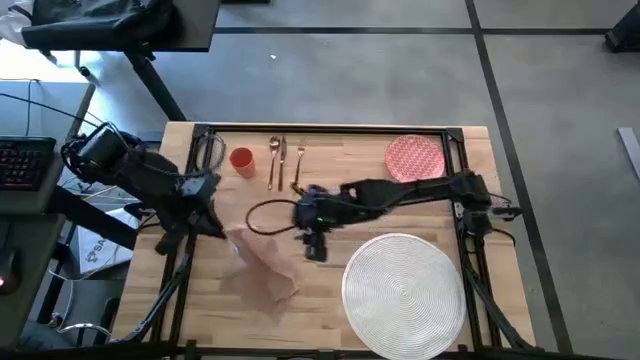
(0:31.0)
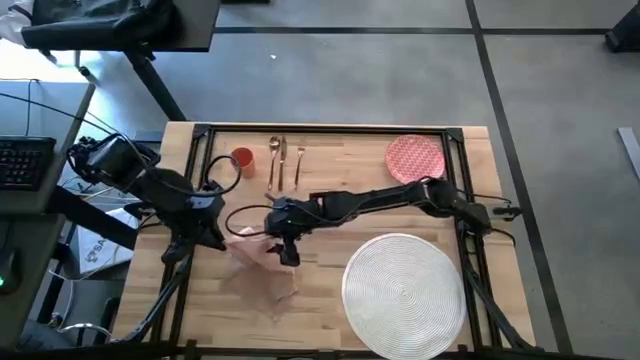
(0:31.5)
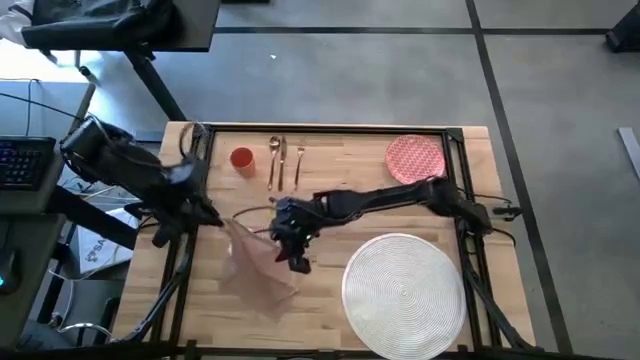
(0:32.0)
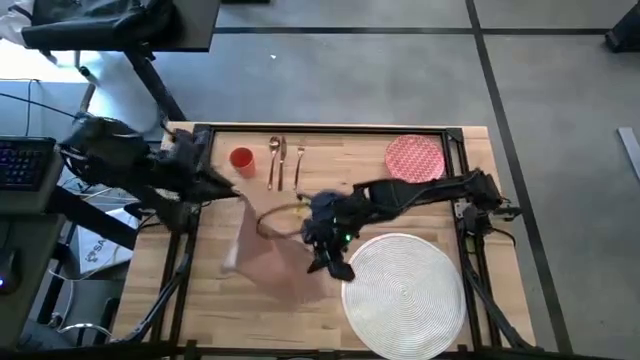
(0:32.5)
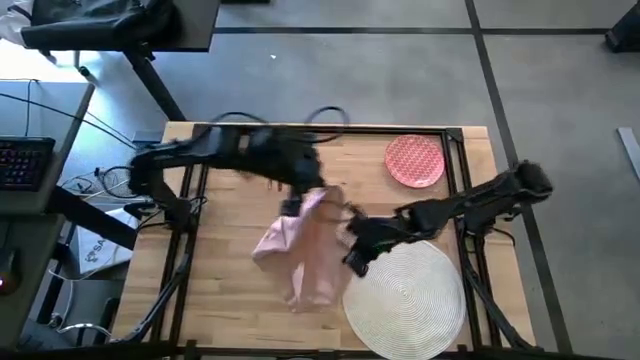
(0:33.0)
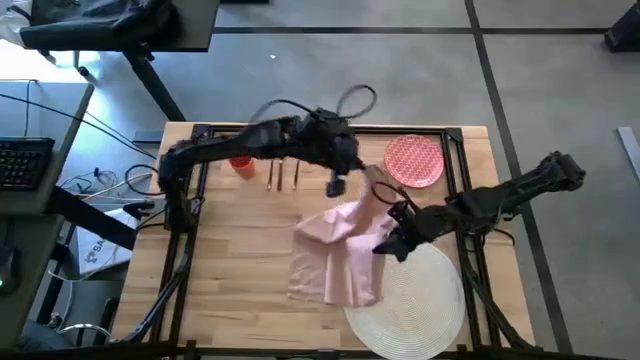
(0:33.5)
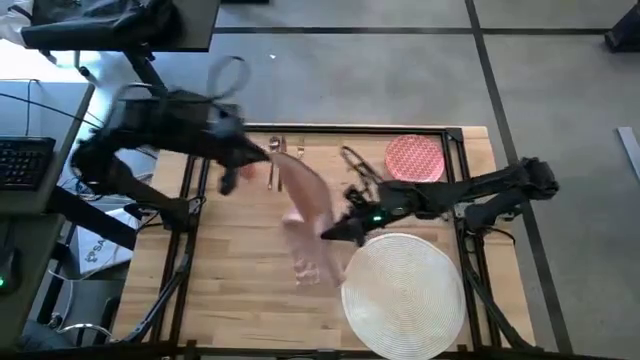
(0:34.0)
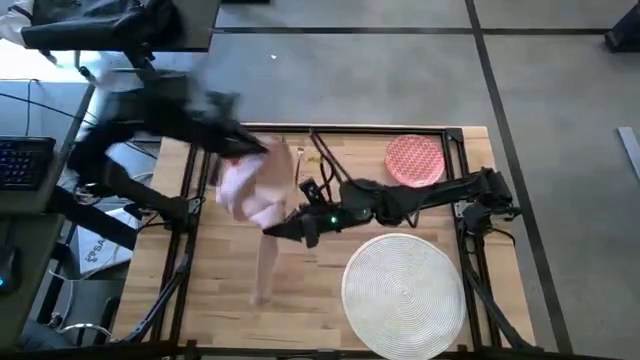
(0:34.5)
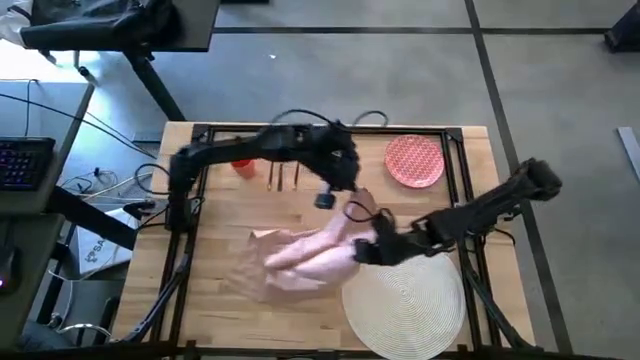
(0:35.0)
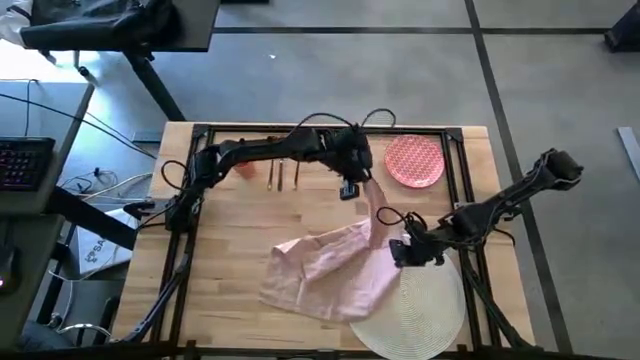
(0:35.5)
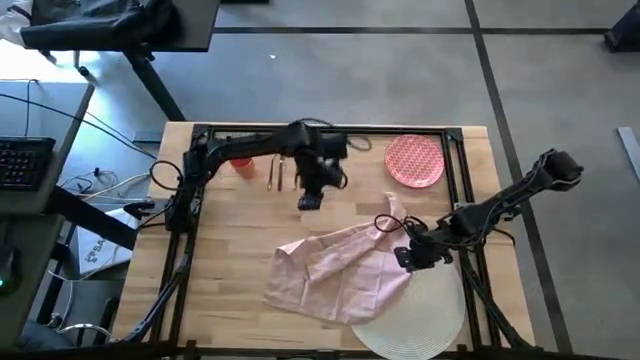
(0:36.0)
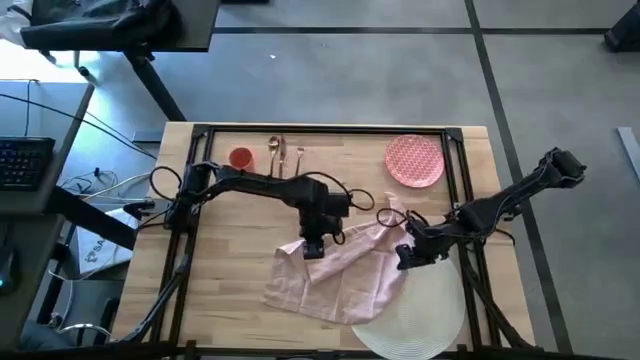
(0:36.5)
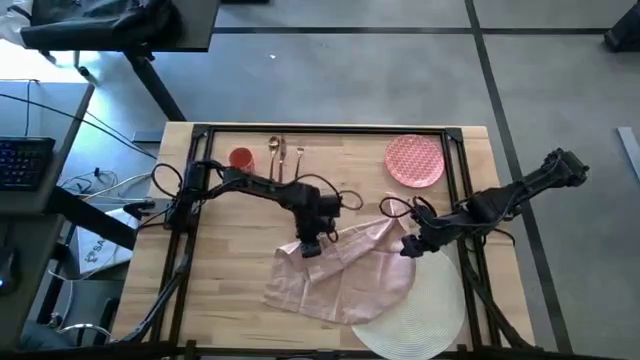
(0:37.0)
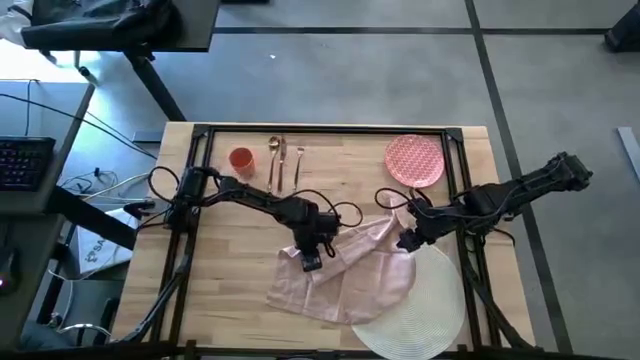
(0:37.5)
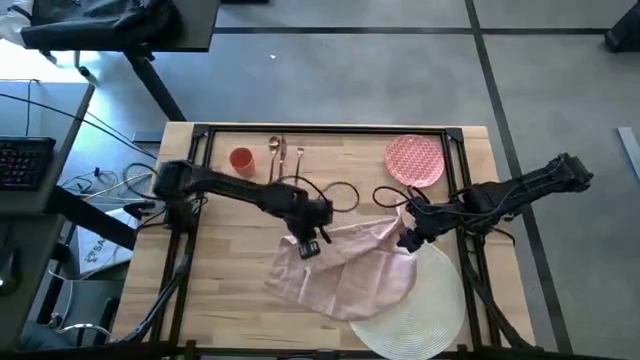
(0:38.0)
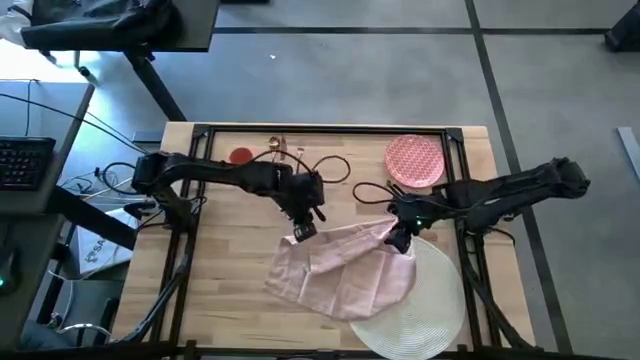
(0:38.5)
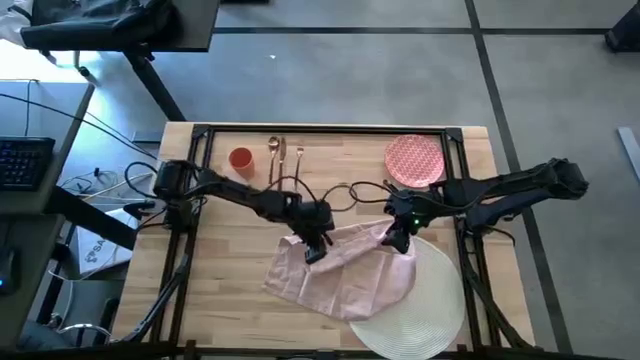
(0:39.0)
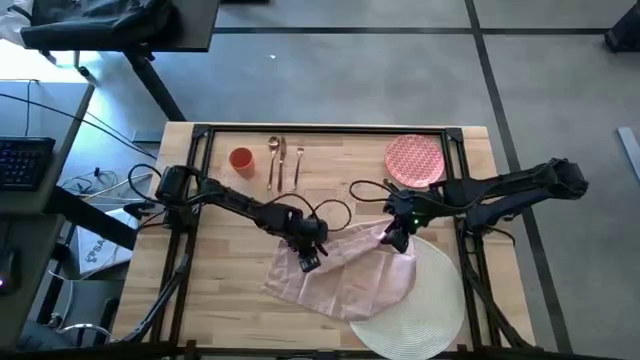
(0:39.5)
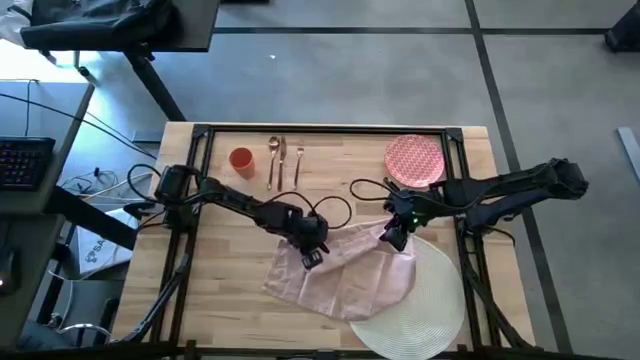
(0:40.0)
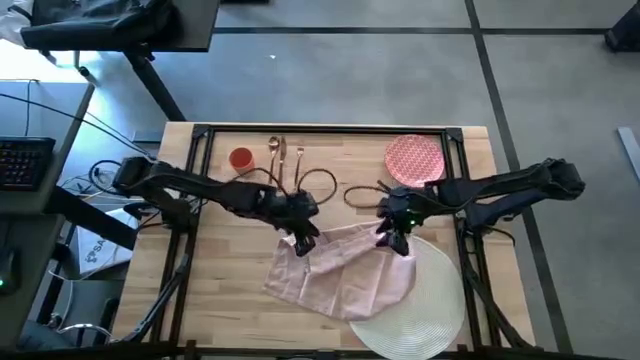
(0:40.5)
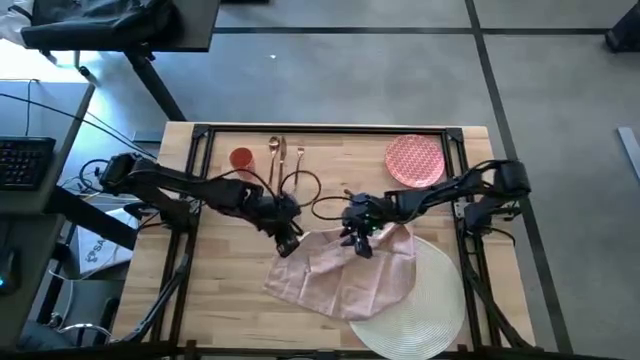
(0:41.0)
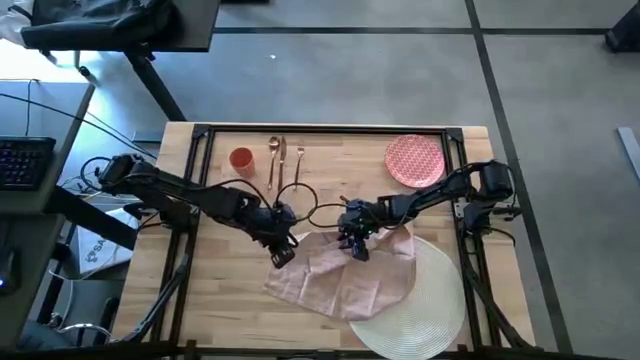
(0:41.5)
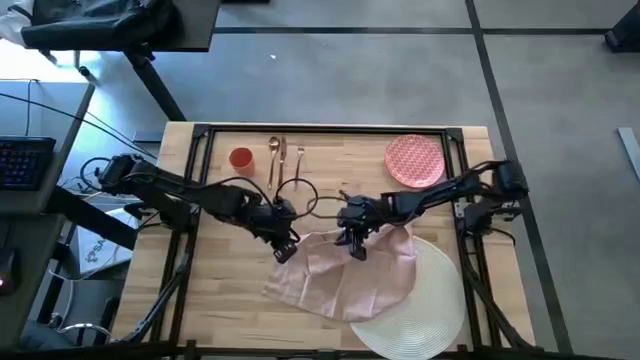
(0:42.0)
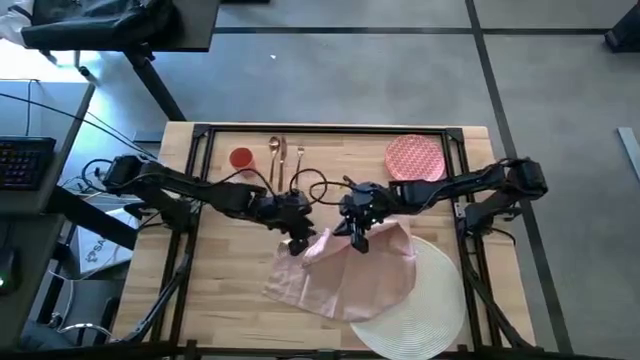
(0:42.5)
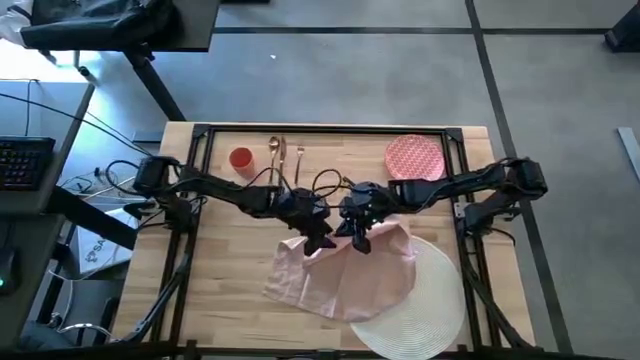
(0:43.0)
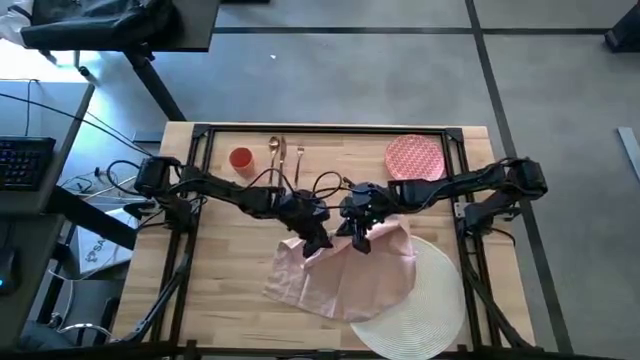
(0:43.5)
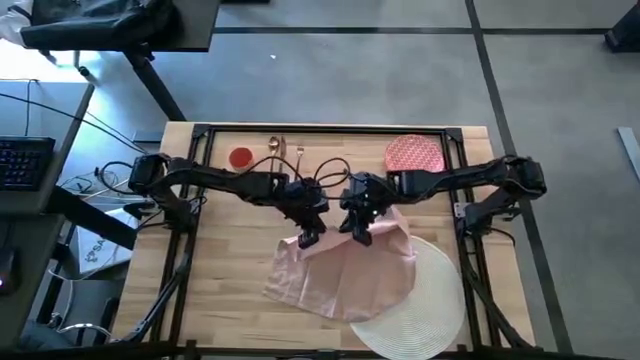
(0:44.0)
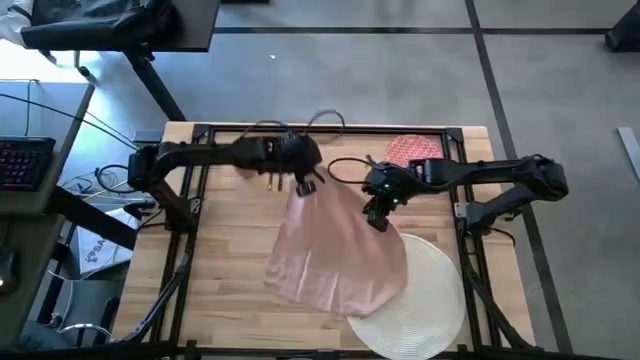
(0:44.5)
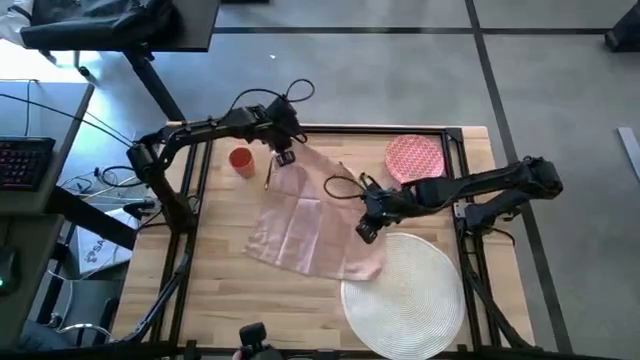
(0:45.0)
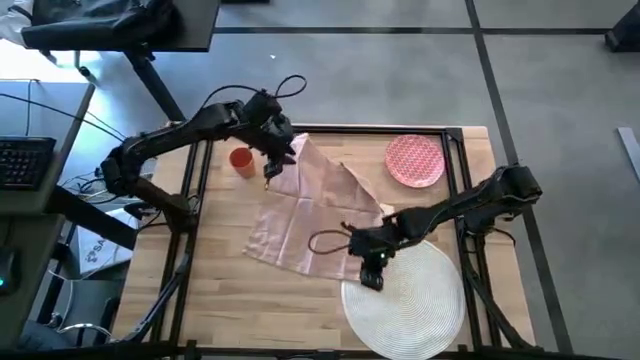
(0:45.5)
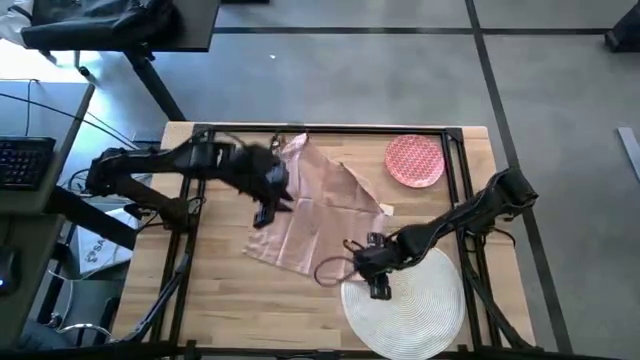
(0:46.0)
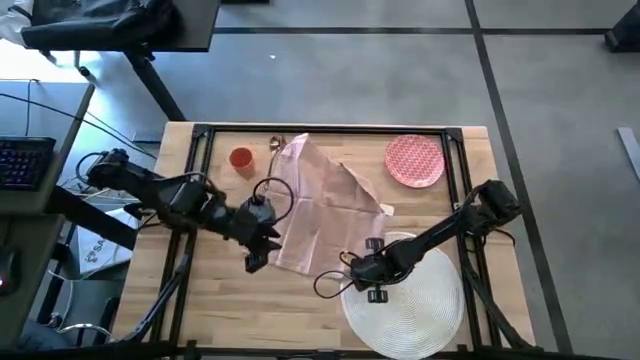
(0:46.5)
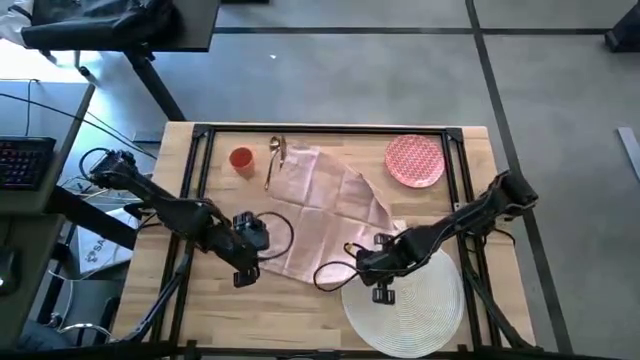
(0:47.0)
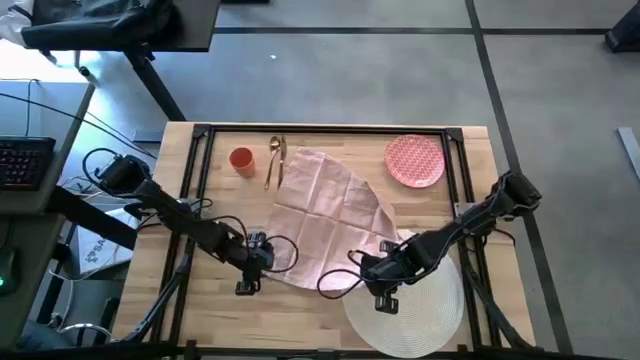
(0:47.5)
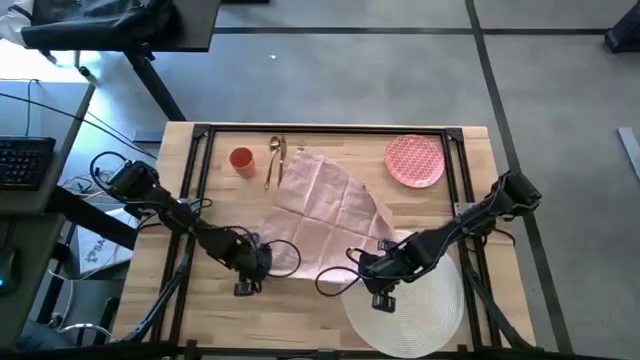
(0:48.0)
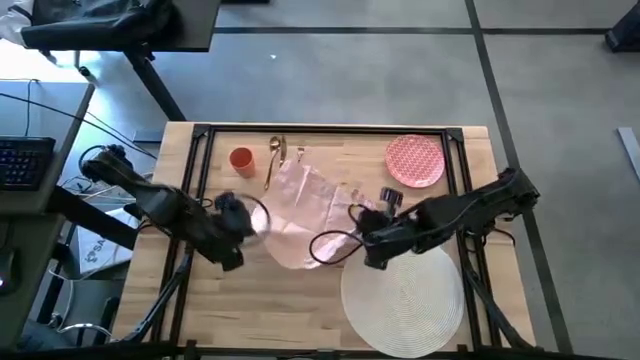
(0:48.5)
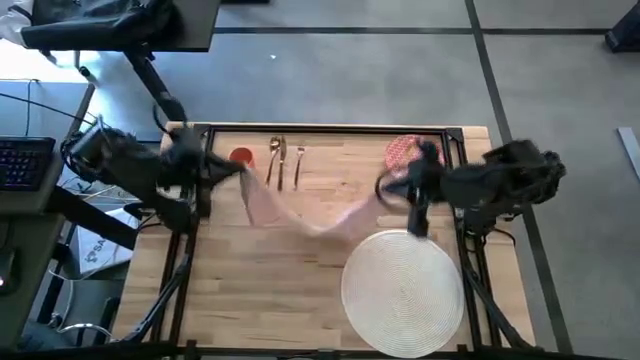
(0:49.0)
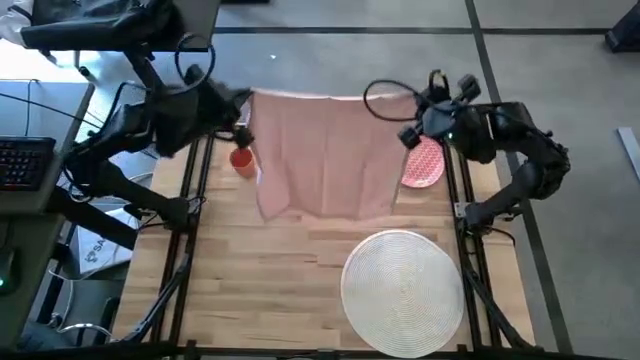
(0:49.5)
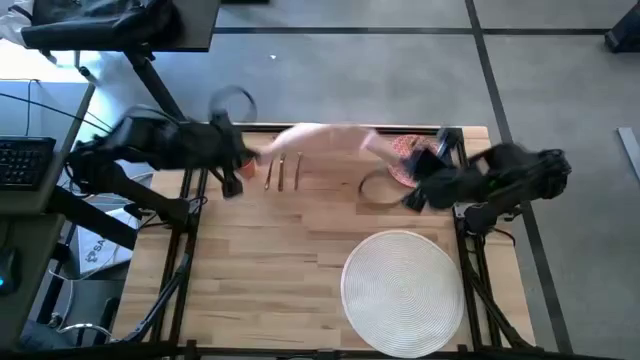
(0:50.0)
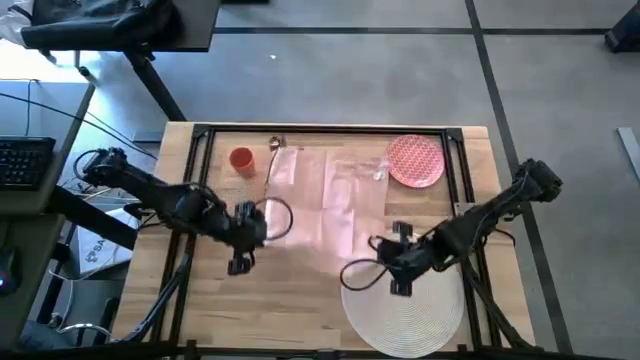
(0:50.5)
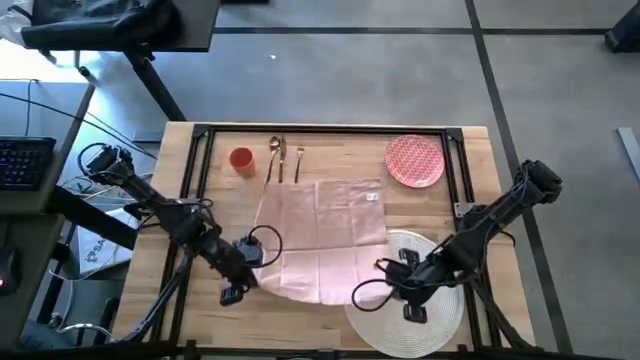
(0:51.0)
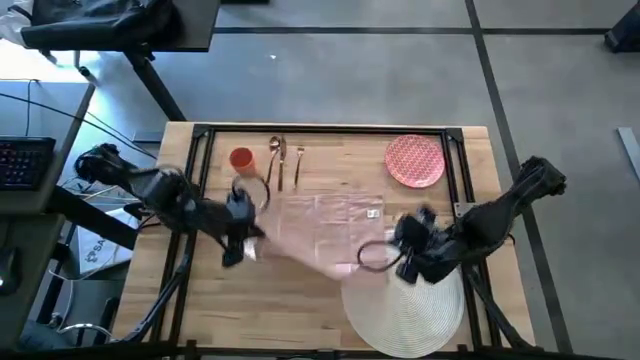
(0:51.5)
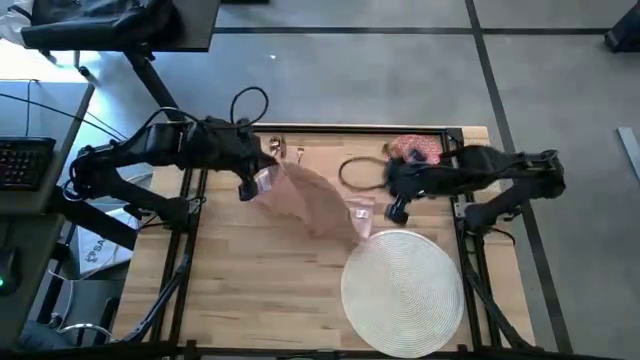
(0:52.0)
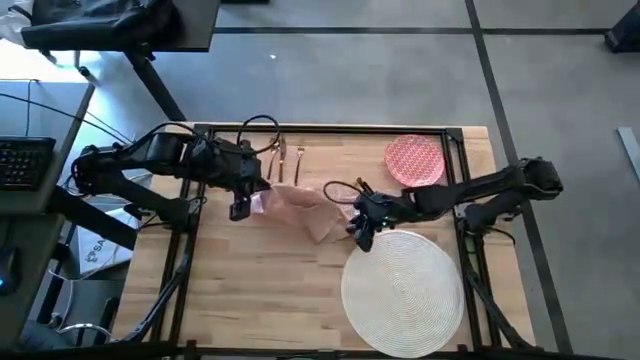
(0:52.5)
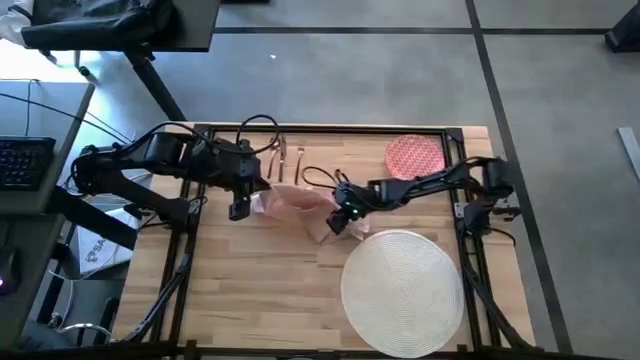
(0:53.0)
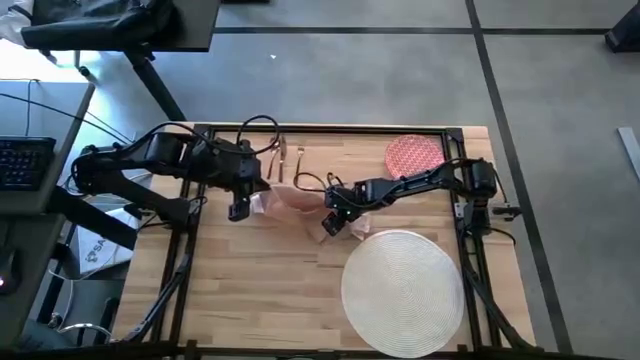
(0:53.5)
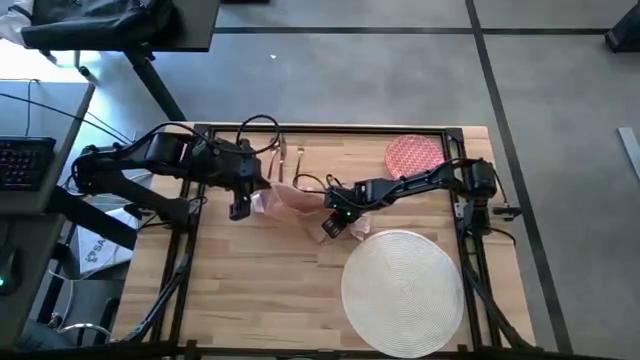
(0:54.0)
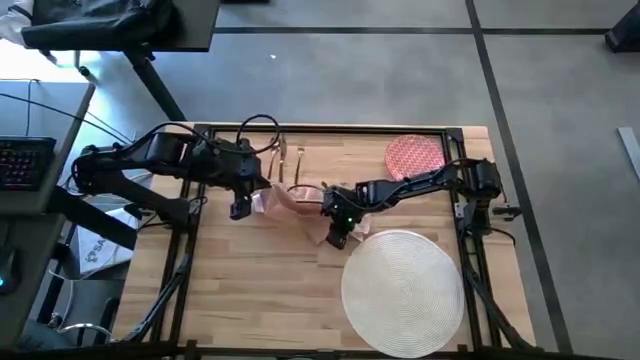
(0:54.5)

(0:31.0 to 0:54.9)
Task: Set table place
Fold pink table napkin
